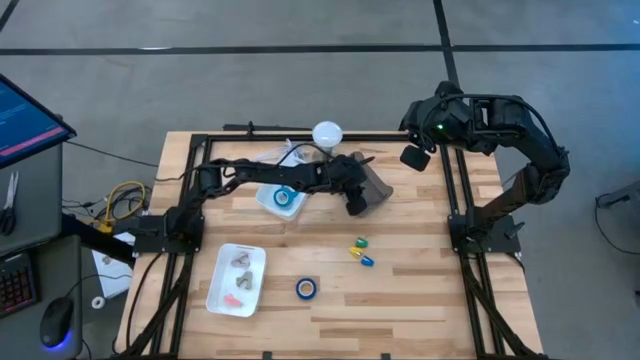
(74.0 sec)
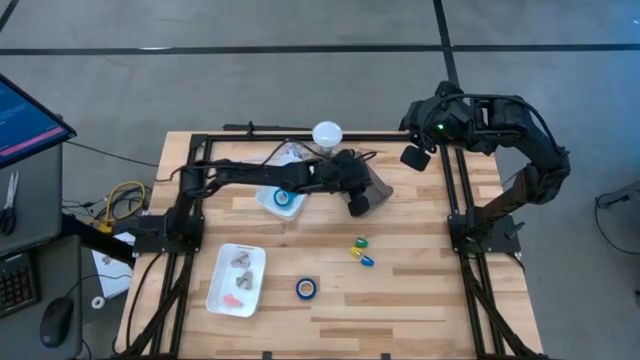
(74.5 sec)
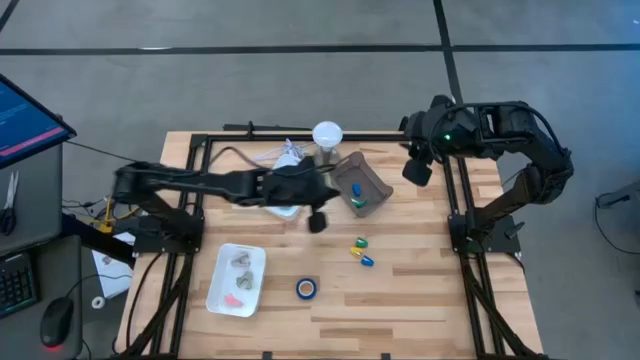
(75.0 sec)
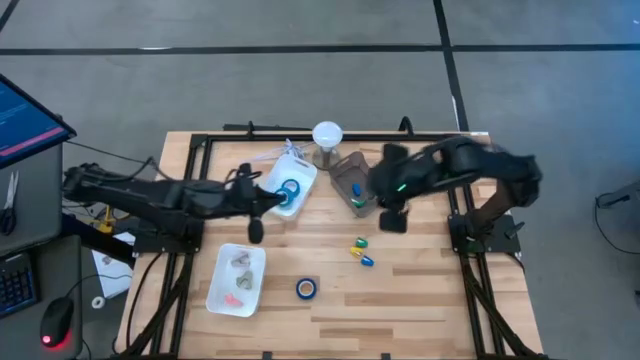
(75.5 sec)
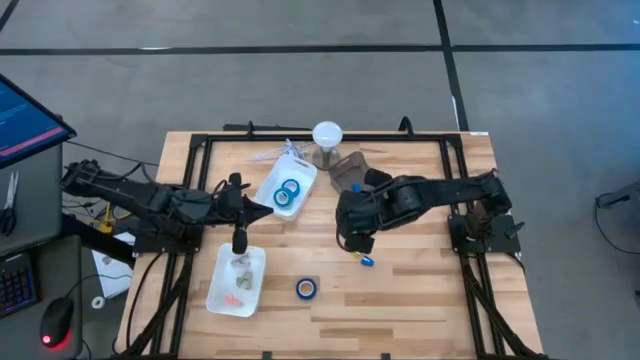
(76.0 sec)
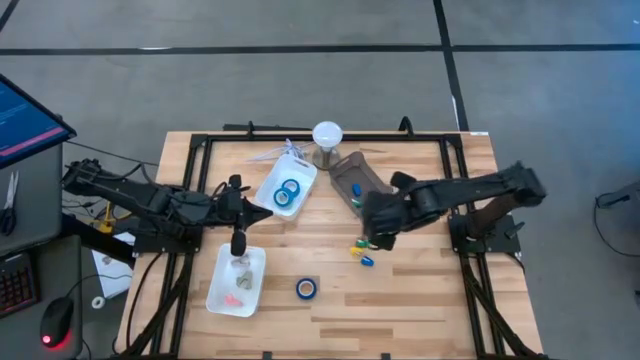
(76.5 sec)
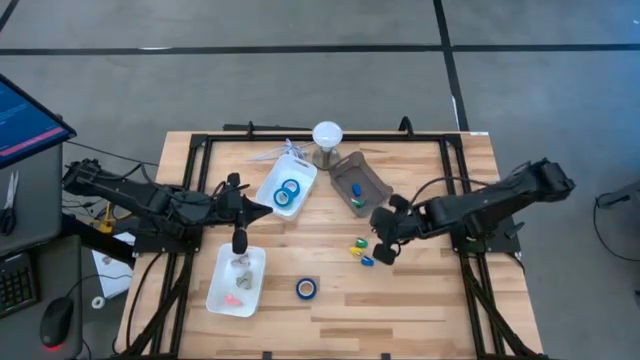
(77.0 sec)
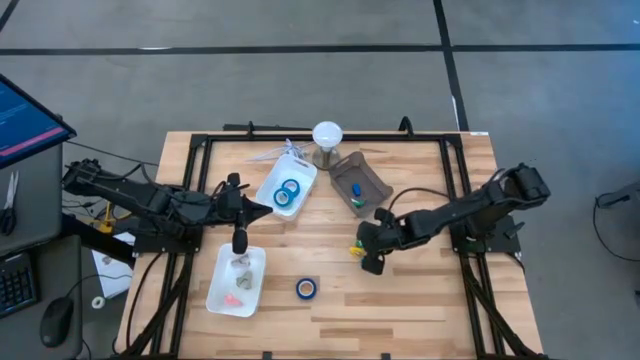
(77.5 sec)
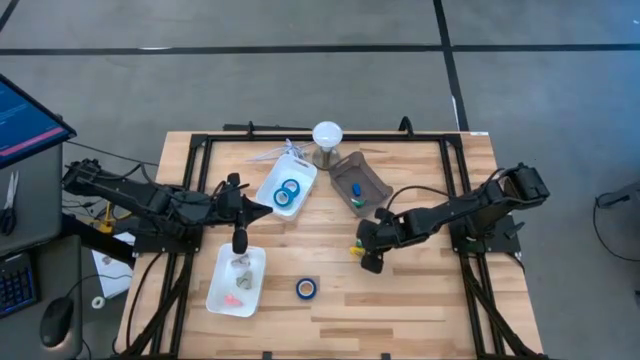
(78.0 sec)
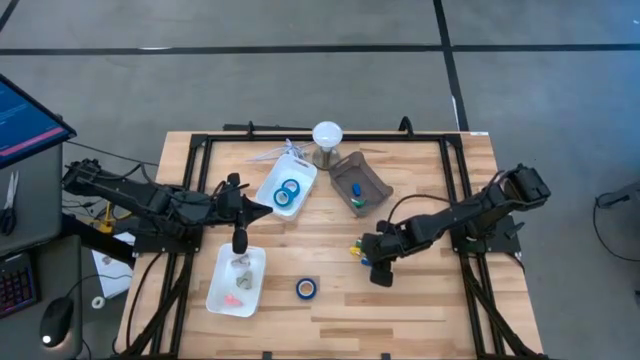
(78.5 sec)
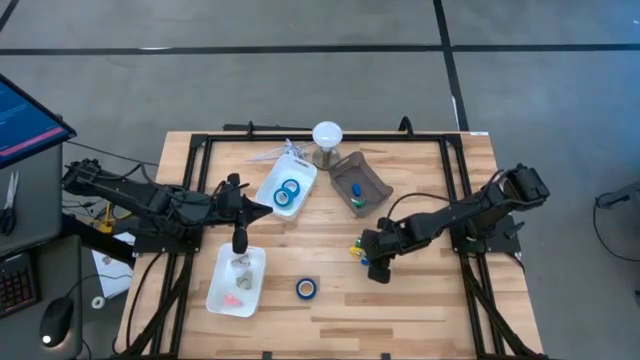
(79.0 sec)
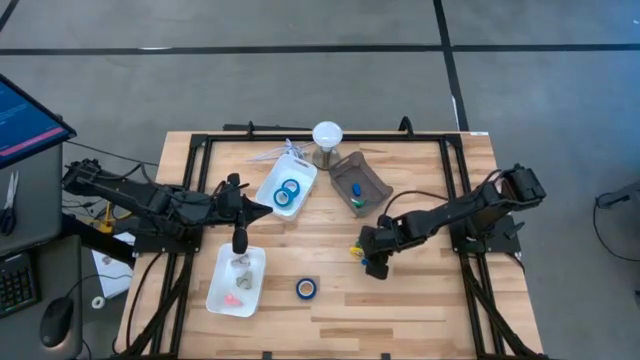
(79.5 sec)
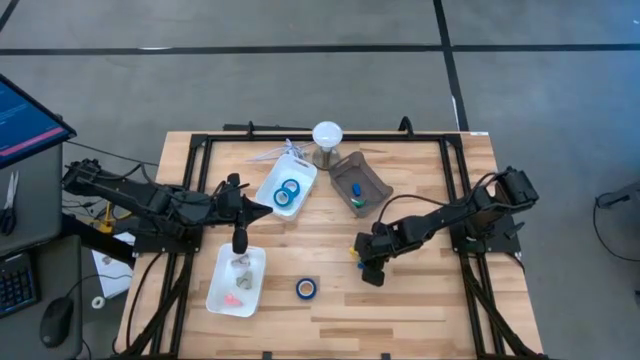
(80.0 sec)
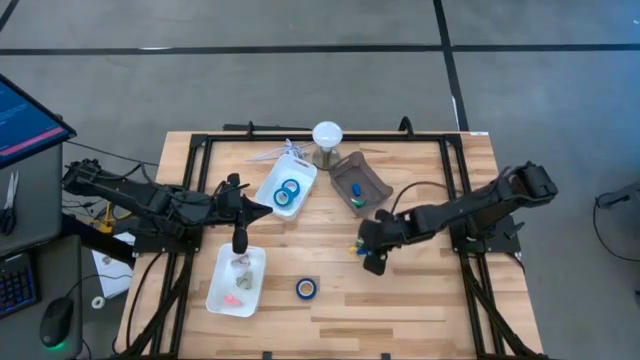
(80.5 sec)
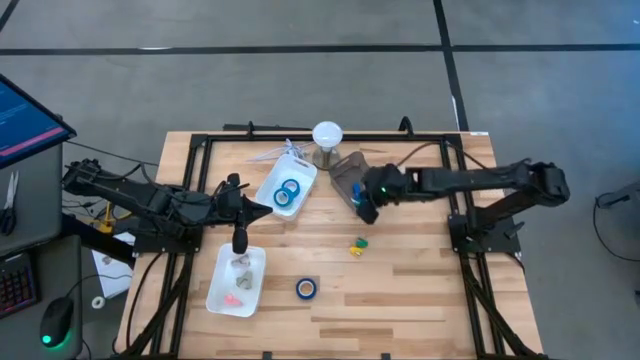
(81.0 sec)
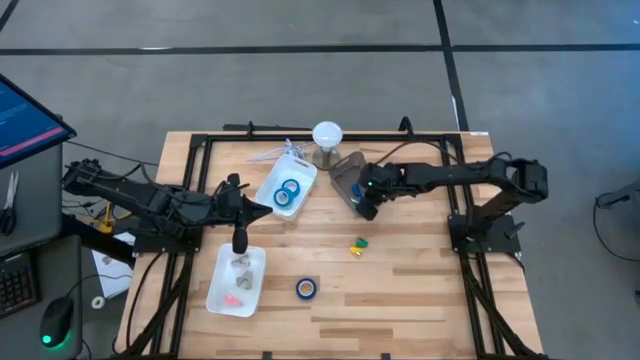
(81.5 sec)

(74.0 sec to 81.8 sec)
Task: Pick and place Stapler, Stapler remover, tape
Put the blue stapler into the black bin

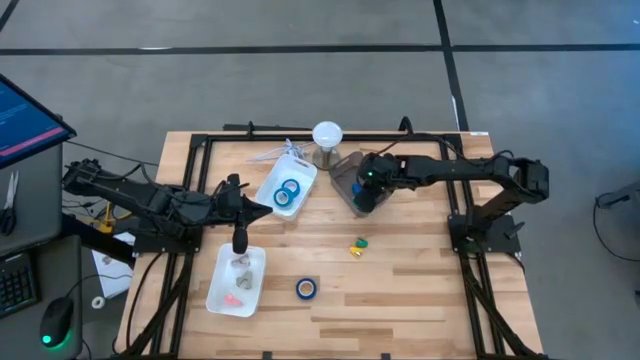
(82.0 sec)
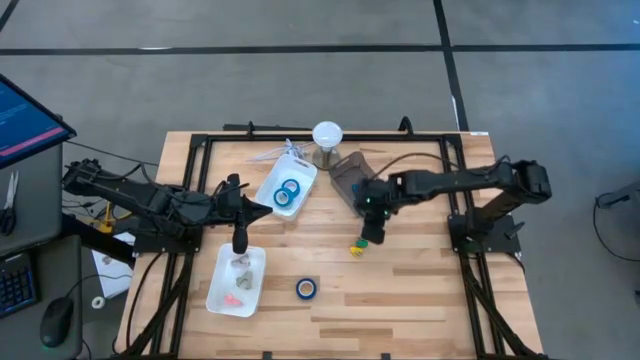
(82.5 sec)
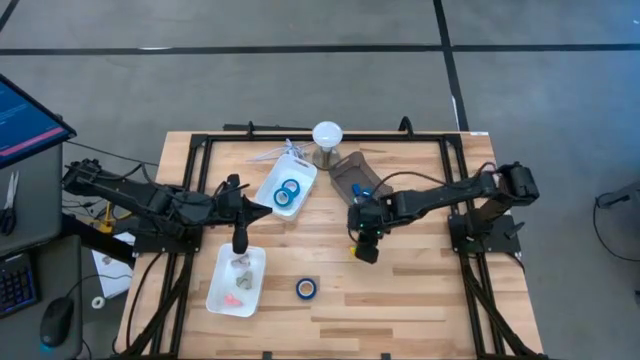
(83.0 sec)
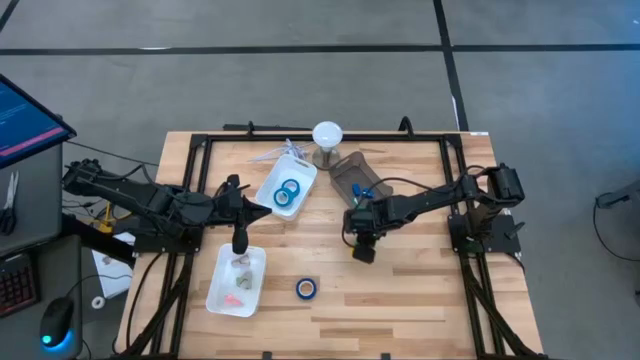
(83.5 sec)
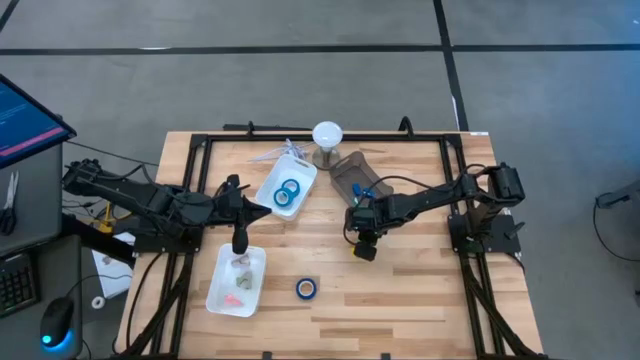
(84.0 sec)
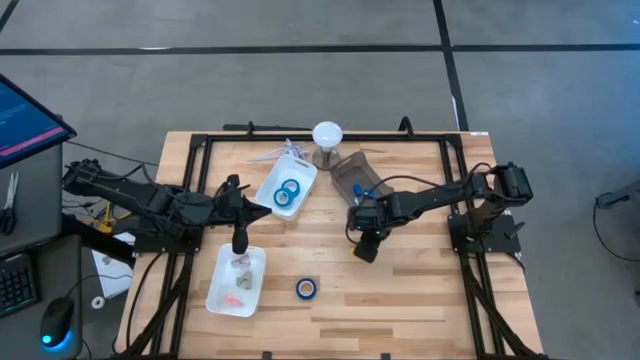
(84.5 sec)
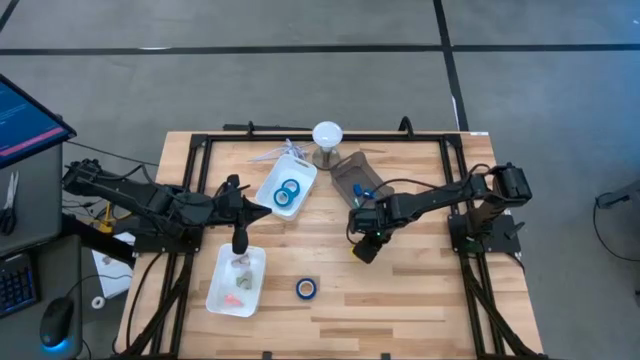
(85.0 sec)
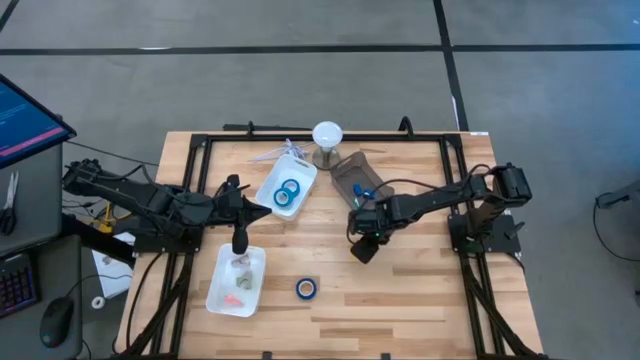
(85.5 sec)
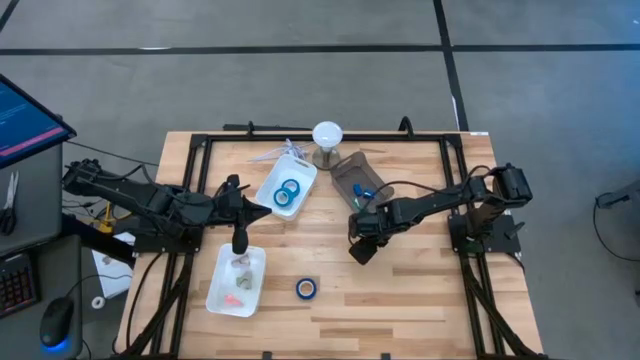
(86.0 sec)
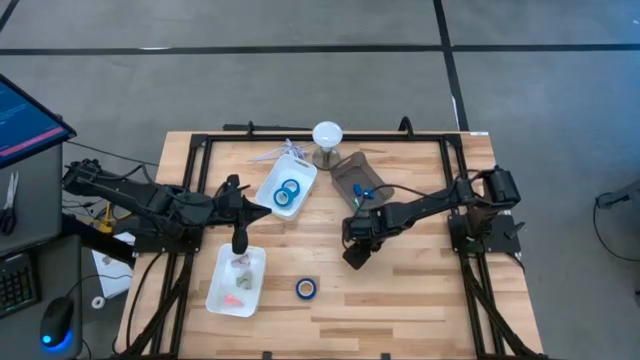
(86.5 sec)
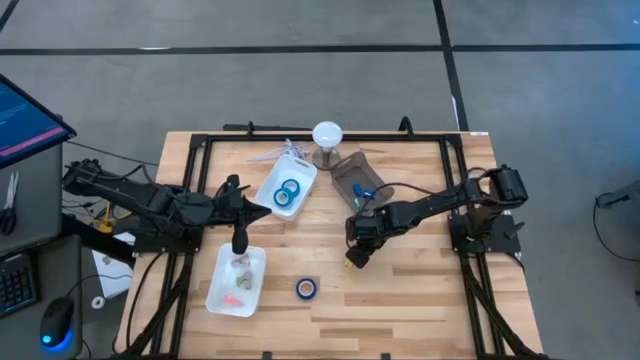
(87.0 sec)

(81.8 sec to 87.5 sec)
Put the green stapler into the black bin

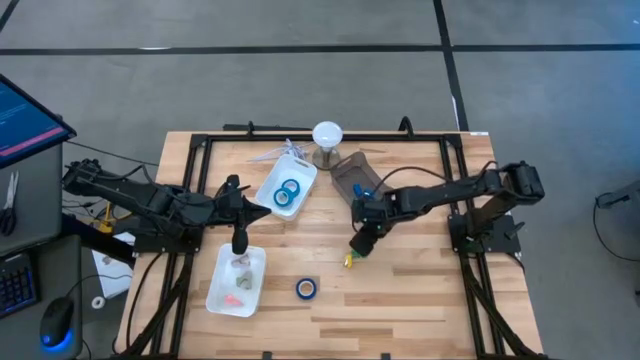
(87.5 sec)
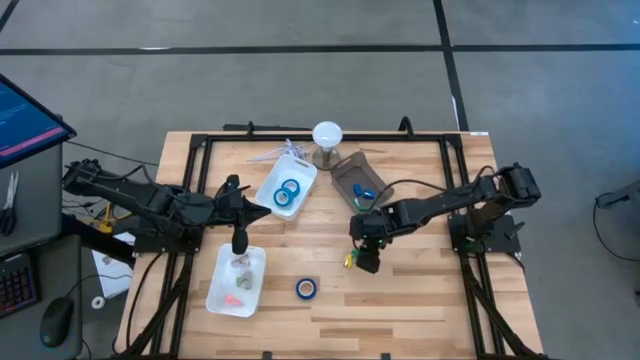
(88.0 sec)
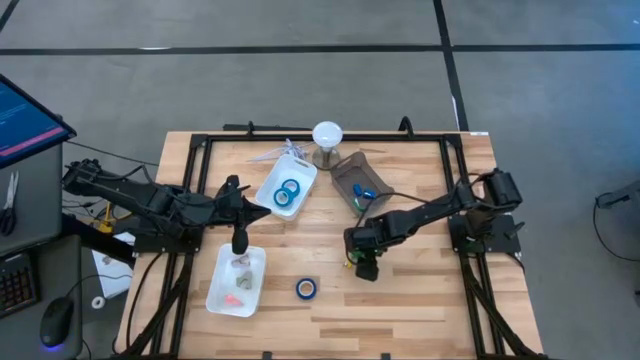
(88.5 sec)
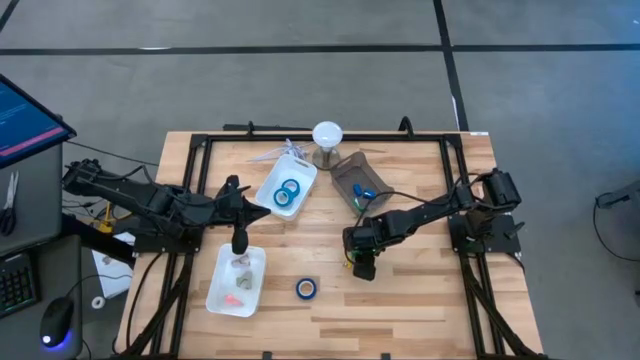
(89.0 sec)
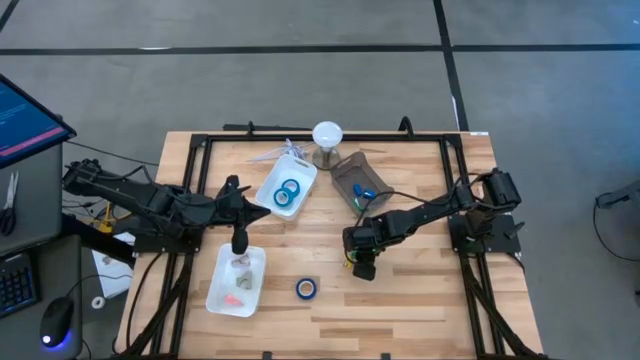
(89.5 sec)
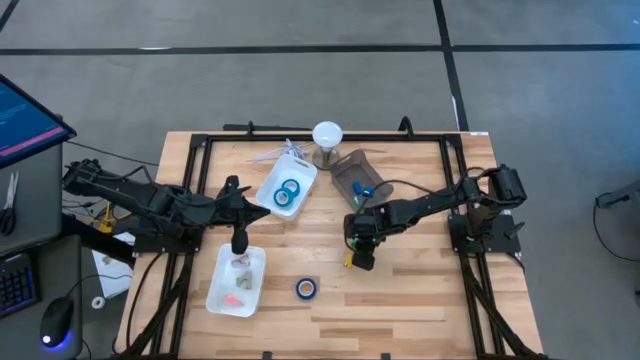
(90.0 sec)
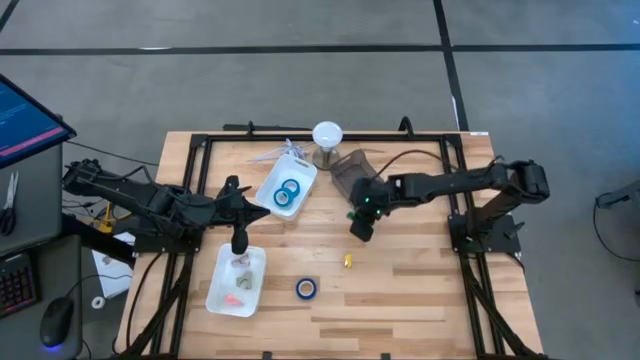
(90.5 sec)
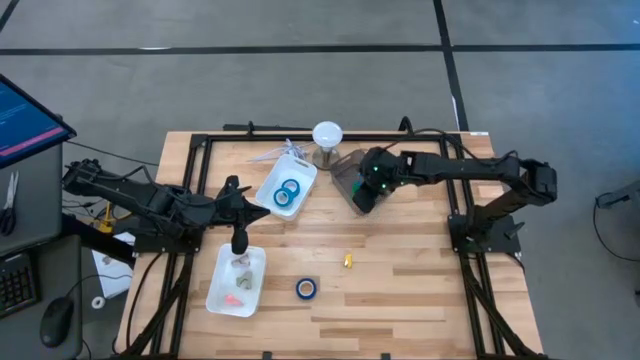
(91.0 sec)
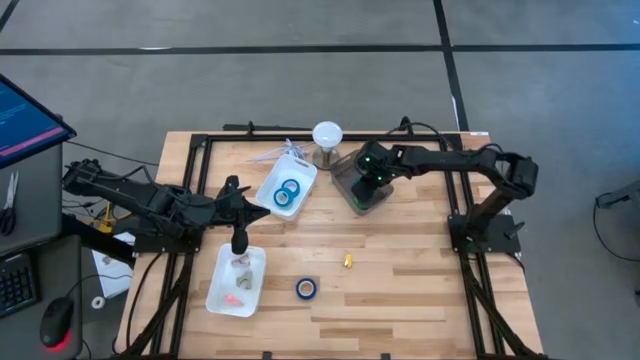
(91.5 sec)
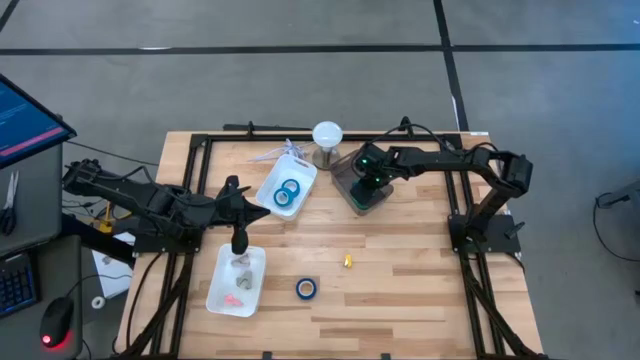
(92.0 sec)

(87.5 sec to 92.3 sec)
Put the green stapler into the black bin

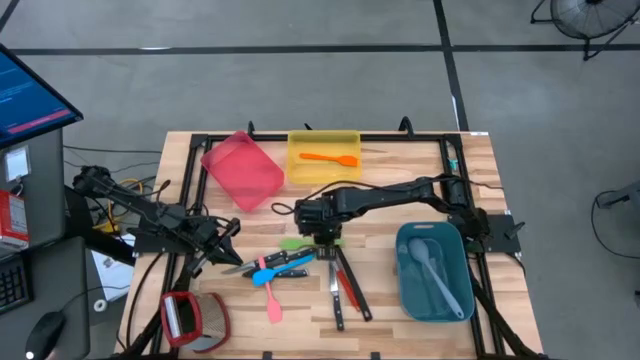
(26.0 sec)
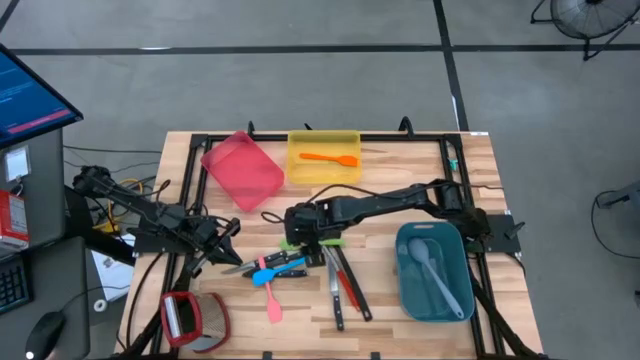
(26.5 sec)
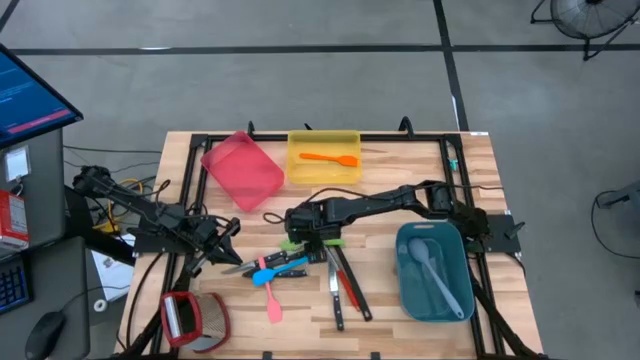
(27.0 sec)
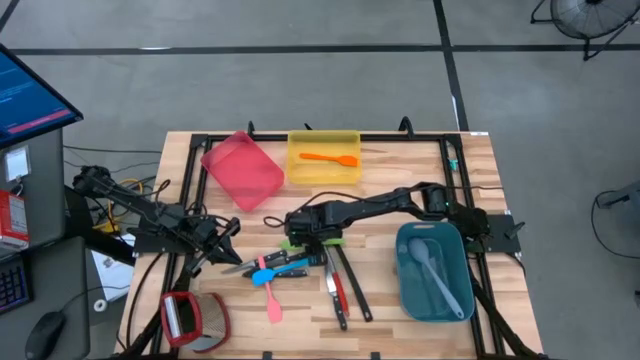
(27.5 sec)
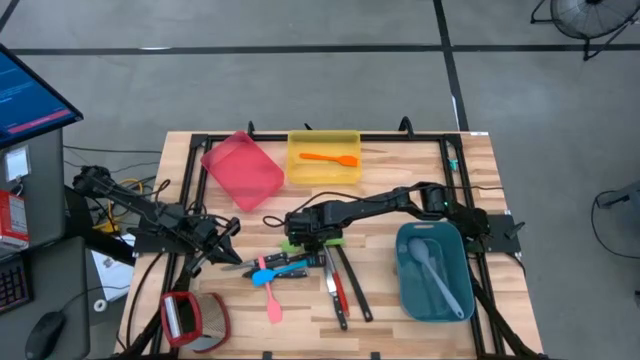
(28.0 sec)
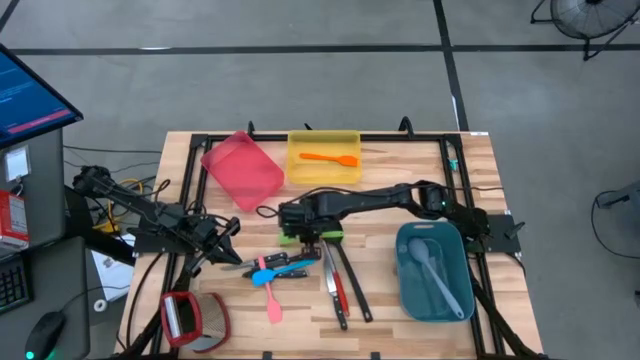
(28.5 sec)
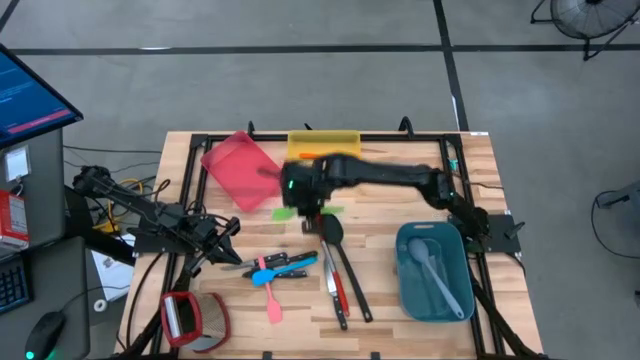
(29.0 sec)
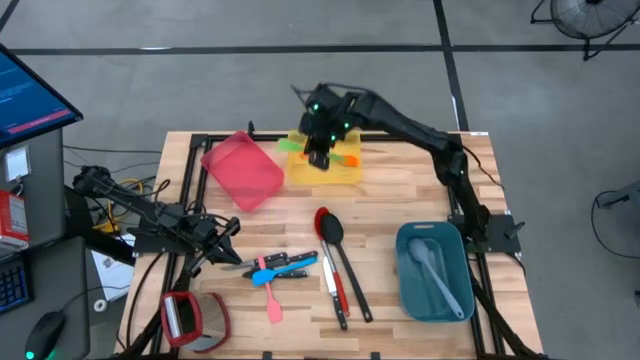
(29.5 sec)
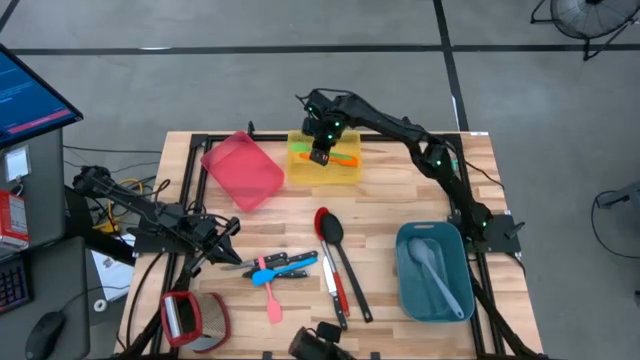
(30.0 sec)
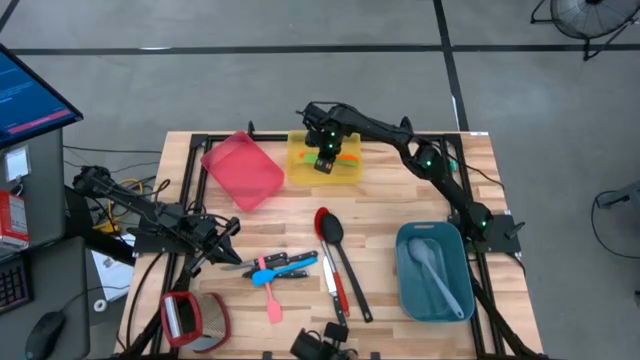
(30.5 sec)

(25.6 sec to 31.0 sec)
Task: Pick & Place Kitchen Items
Put the light green spatula into the yellow bin
